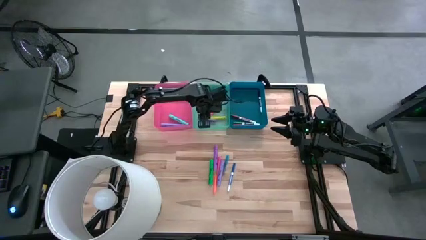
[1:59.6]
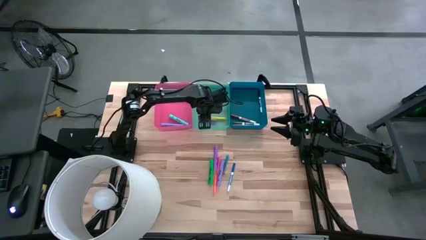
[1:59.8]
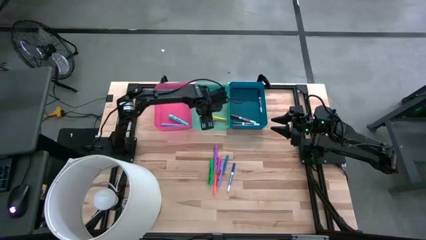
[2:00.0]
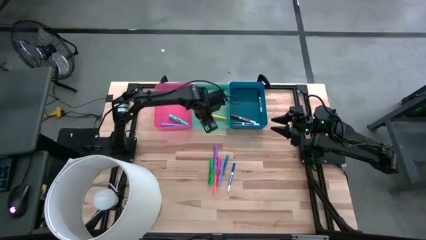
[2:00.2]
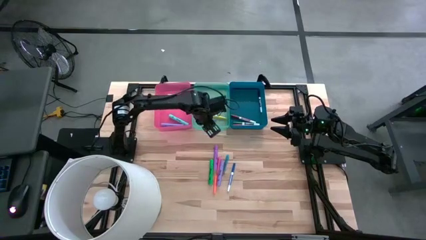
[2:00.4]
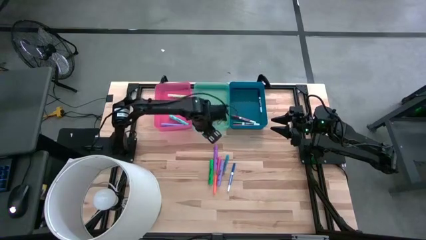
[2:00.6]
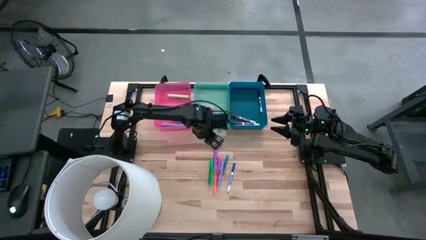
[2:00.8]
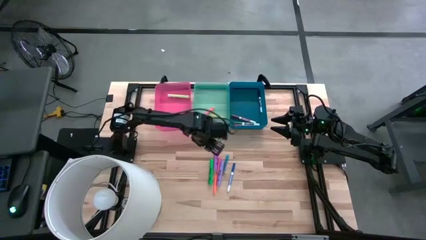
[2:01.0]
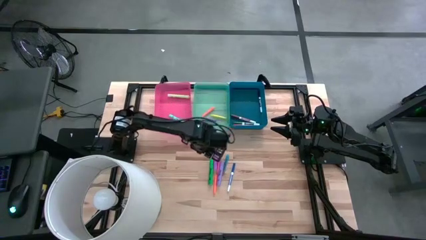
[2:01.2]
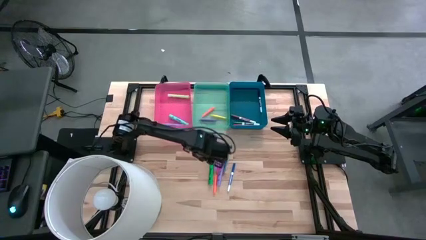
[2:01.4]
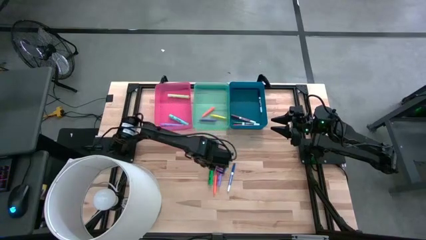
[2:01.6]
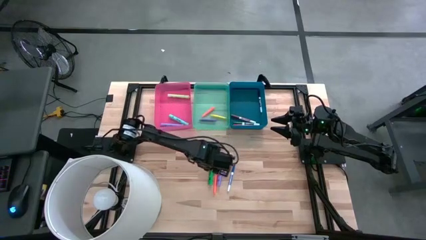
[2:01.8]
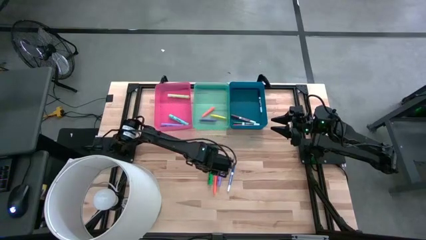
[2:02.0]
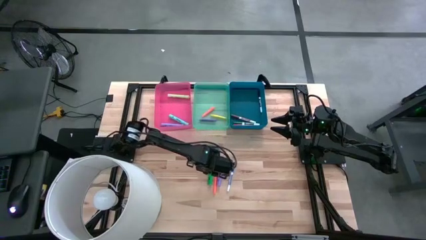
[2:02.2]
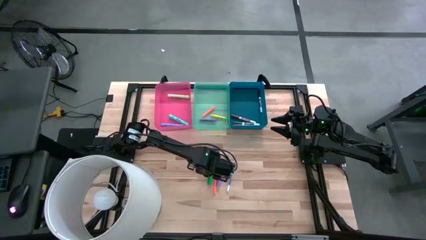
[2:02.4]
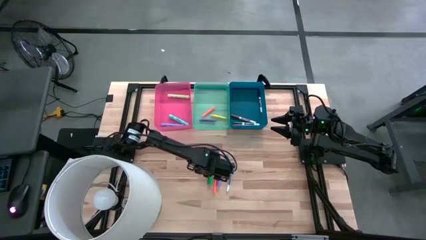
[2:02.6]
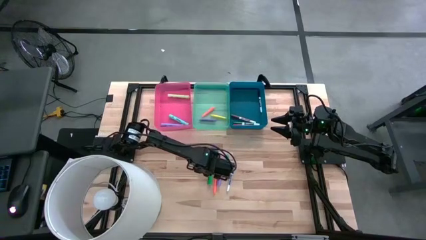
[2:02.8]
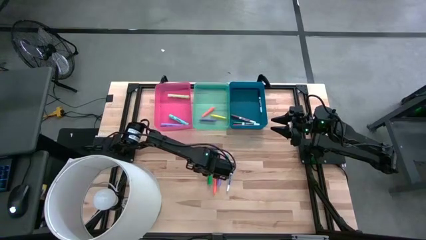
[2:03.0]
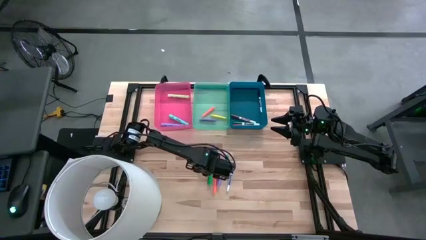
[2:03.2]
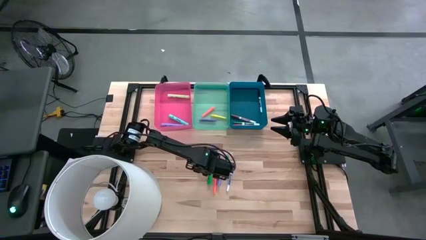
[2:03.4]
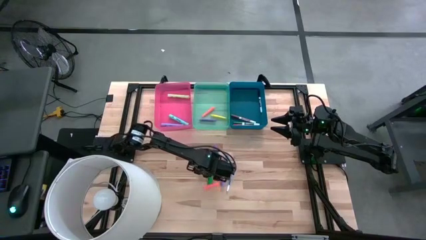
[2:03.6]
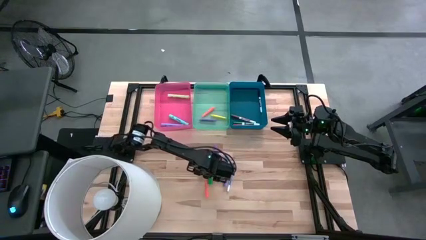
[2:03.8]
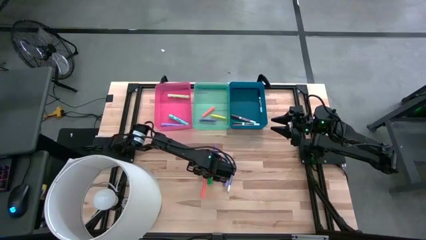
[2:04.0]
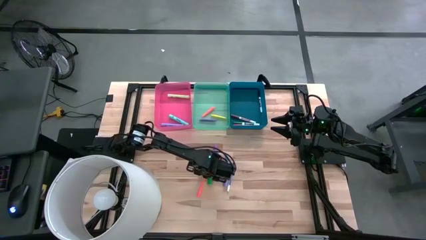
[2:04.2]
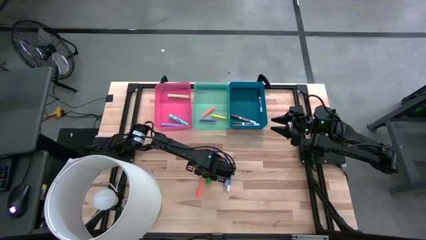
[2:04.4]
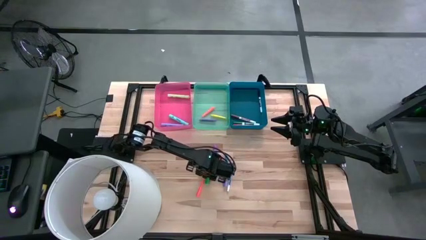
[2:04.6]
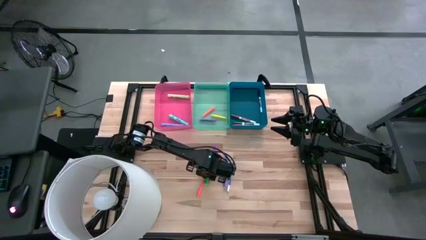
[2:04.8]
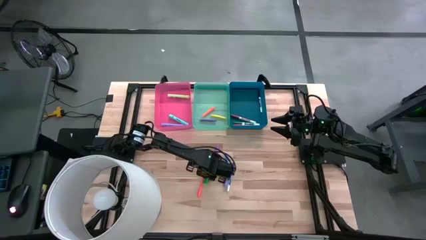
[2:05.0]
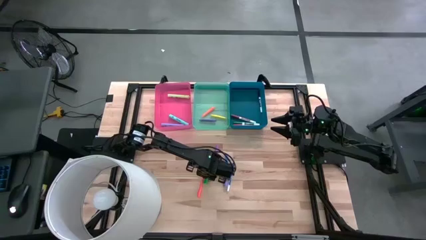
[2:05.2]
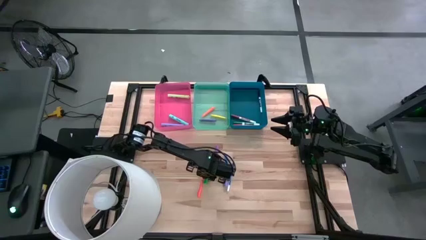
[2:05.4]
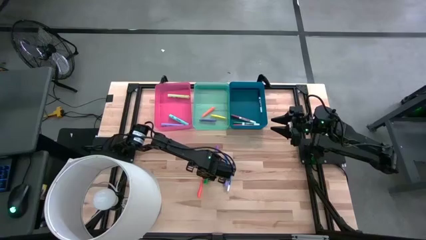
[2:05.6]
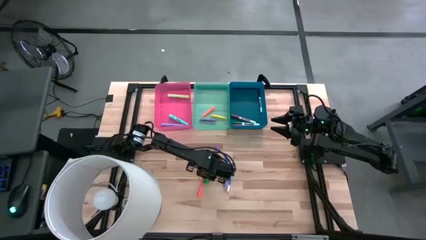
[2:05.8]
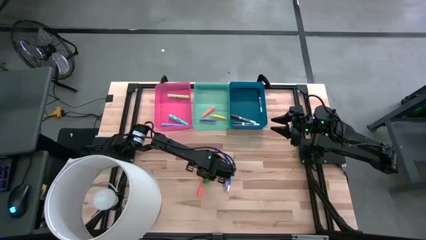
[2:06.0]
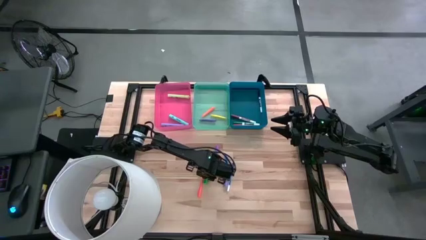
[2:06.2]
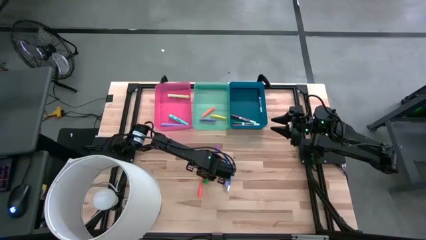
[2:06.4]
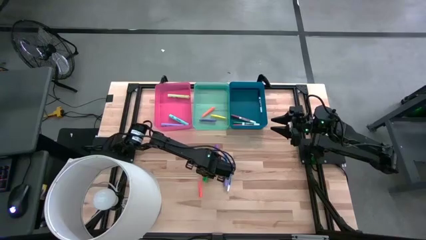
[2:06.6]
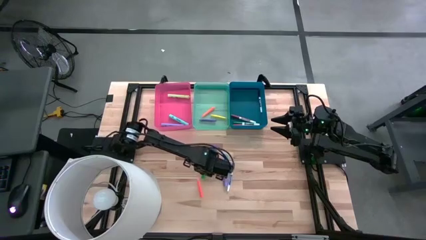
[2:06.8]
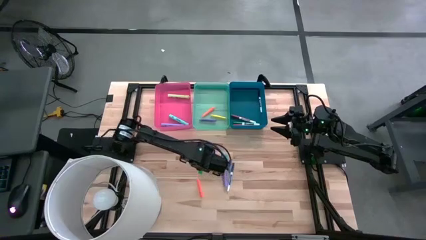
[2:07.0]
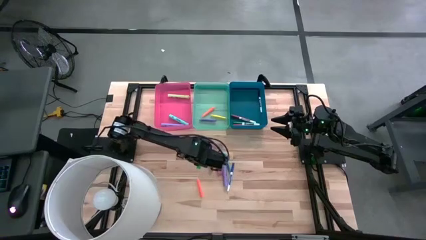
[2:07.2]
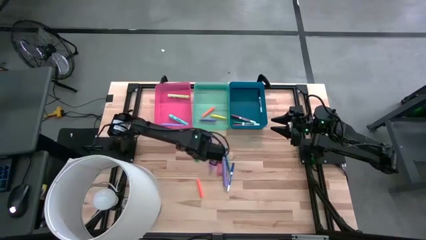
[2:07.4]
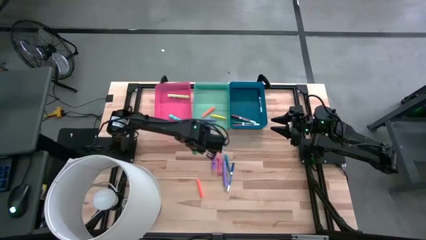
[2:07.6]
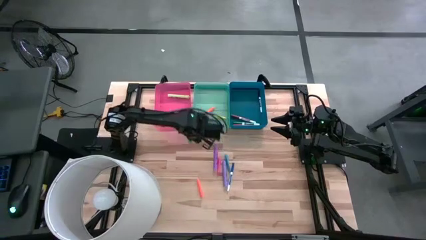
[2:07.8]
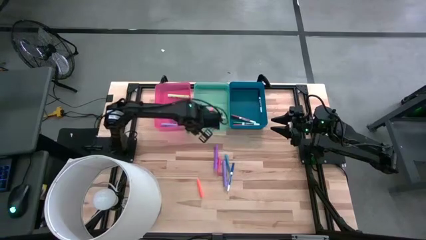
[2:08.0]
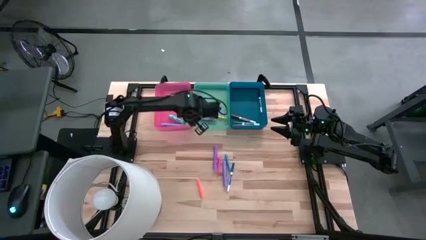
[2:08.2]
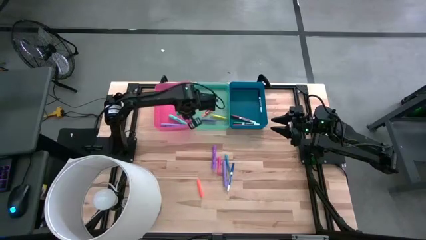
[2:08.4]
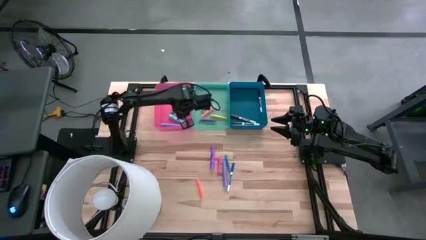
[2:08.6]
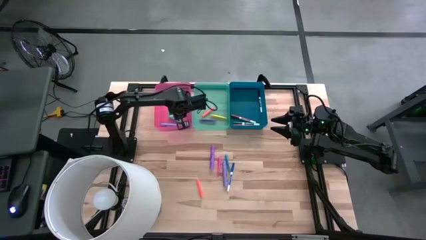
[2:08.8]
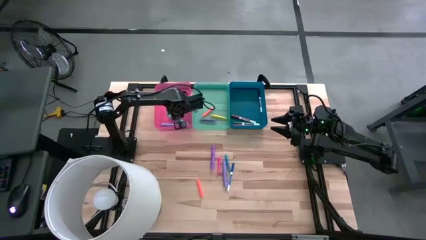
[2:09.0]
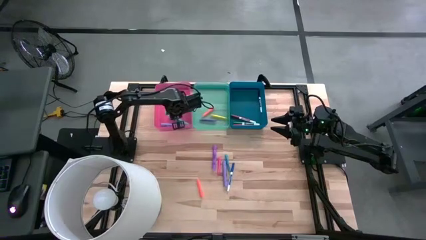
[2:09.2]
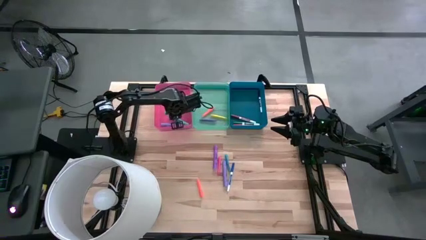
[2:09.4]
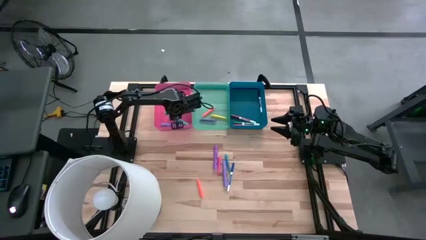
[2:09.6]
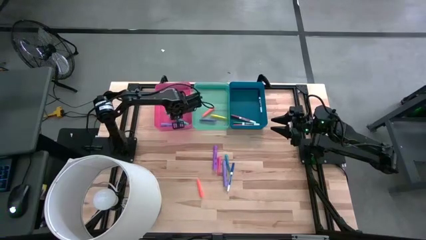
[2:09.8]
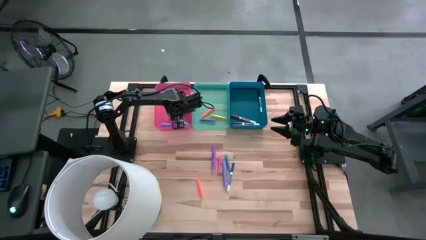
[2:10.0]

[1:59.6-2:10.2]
Task: Pick & Place Markers
Put the green marker into the red bin

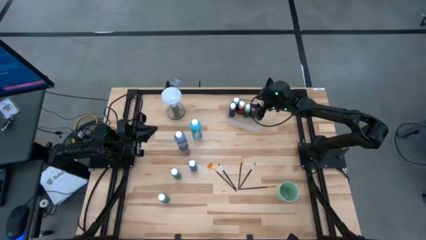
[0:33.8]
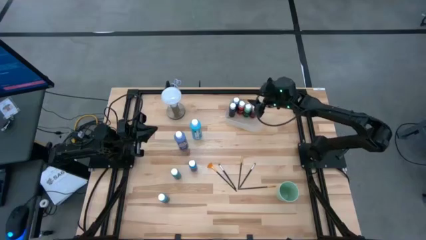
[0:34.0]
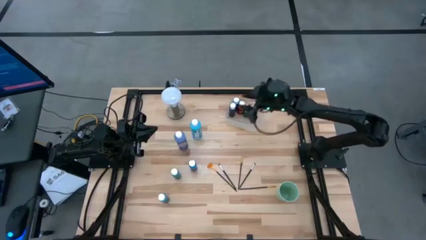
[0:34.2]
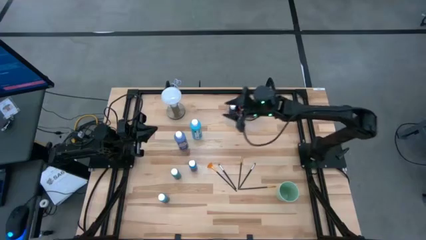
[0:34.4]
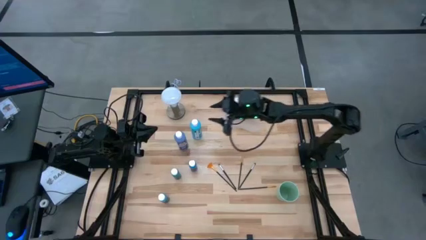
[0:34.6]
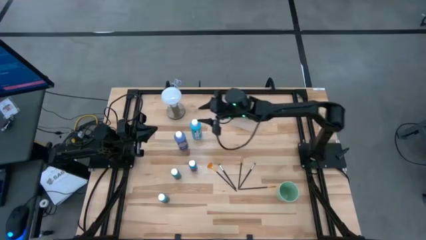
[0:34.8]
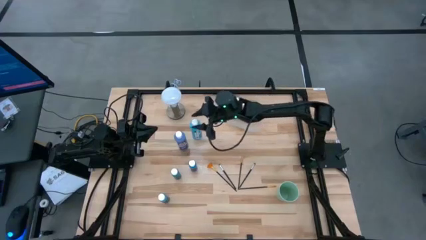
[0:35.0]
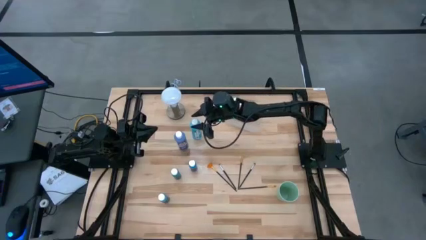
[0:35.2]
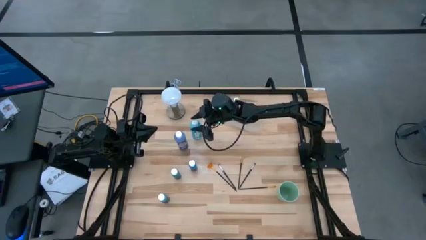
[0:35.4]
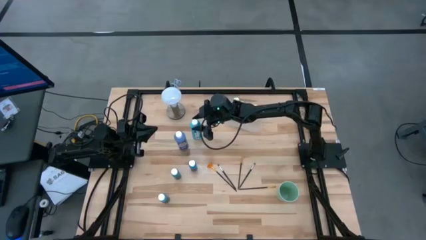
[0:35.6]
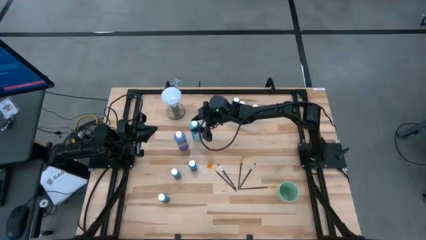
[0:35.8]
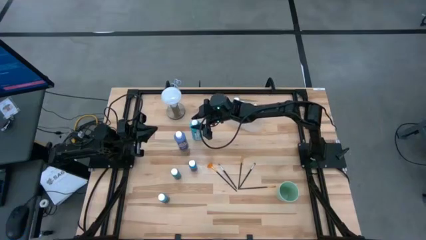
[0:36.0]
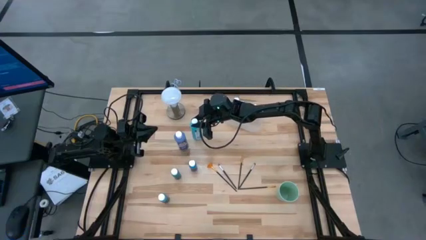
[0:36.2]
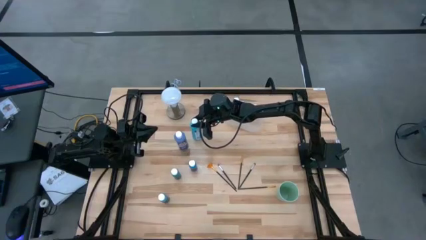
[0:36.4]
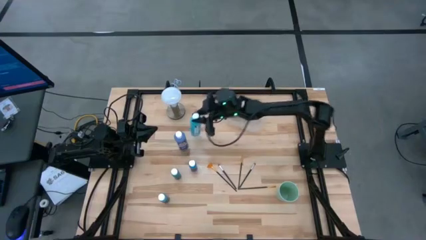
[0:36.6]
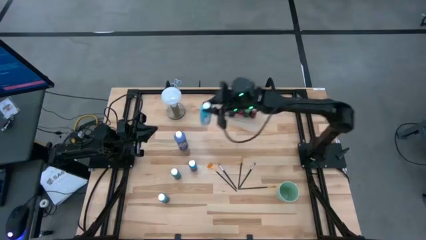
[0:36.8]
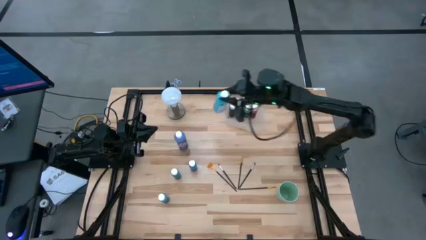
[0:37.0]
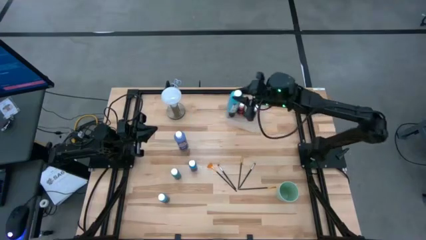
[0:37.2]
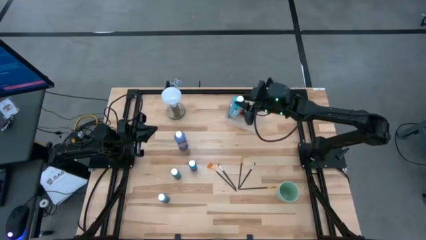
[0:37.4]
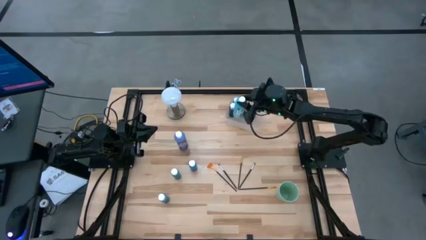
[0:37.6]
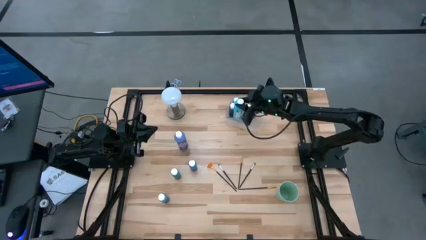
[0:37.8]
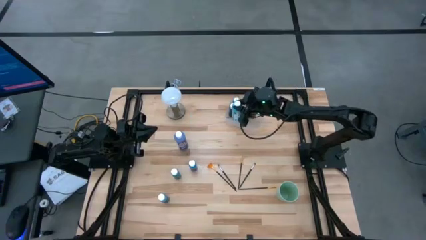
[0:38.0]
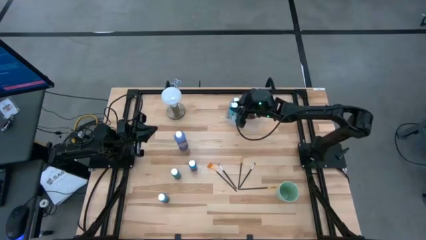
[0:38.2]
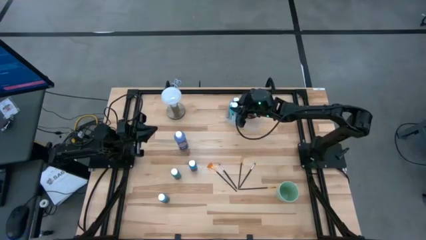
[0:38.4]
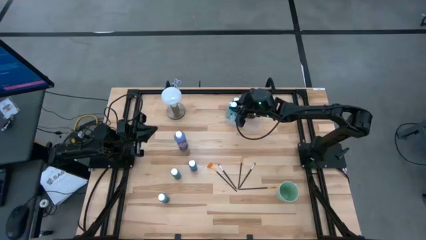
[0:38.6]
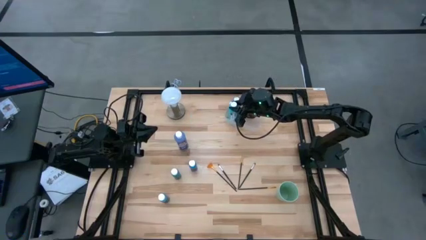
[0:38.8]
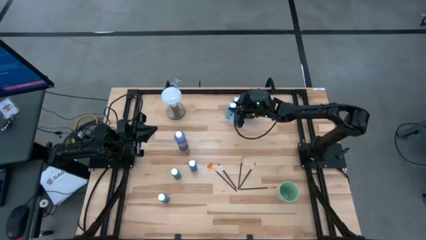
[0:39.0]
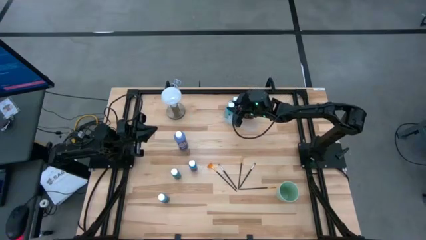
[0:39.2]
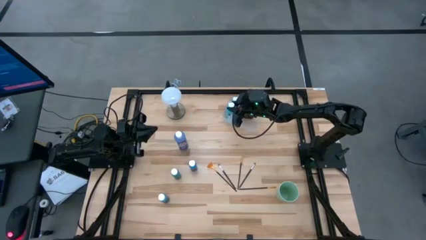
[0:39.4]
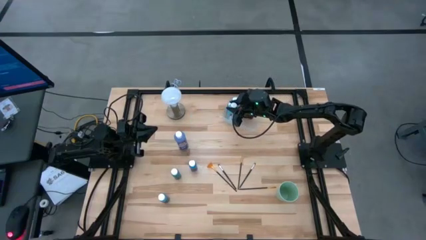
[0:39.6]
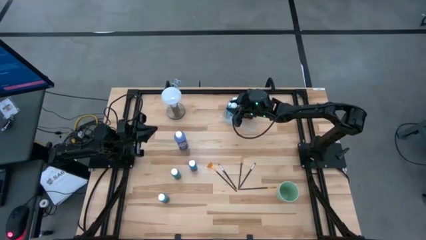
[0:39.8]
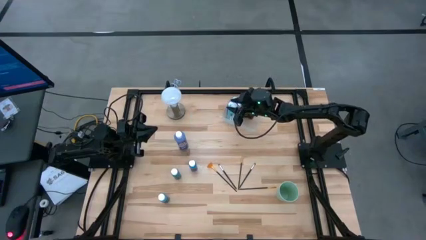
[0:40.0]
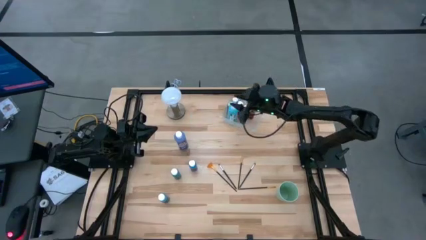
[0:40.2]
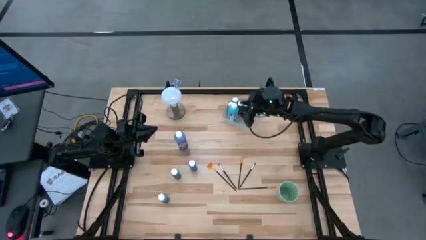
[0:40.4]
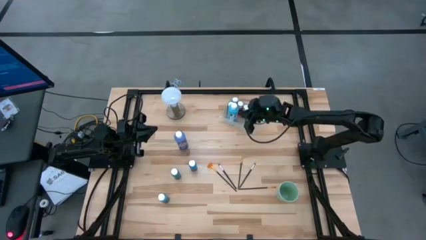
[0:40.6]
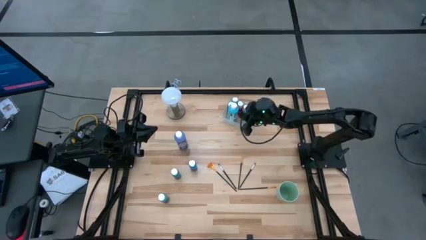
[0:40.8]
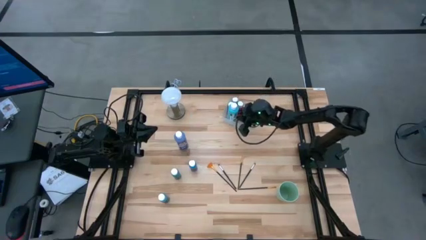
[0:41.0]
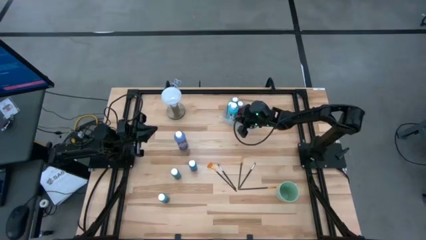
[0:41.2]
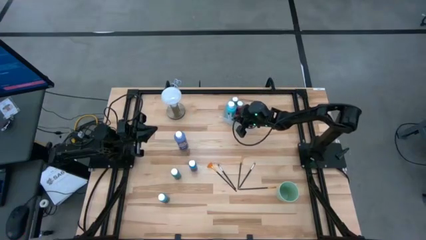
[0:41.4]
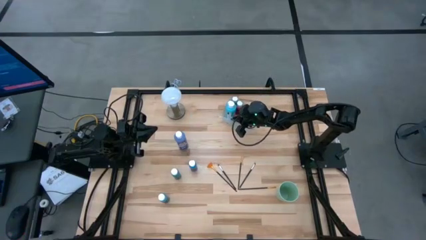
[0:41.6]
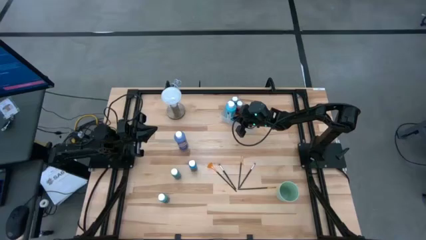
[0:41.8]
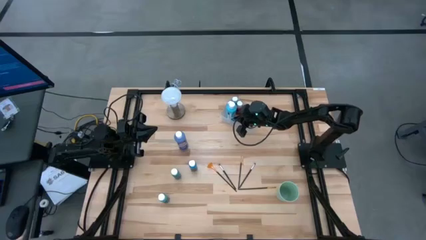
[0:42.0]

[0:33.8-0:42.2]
Task: Pick & Place Paint Supplies
Put the large light blue paint bottle into the transparent bin
